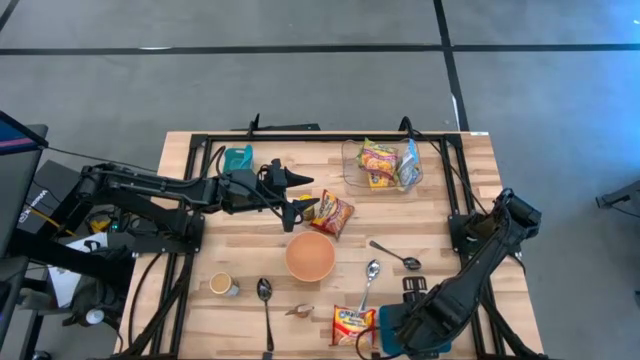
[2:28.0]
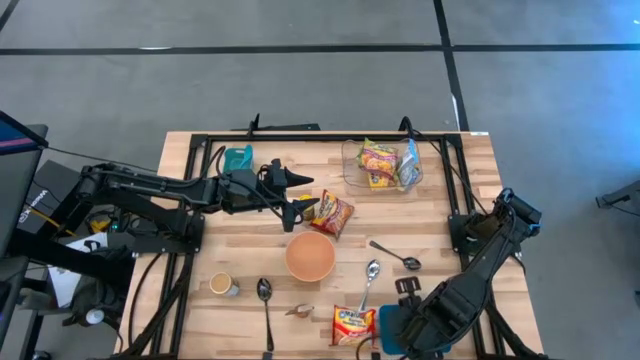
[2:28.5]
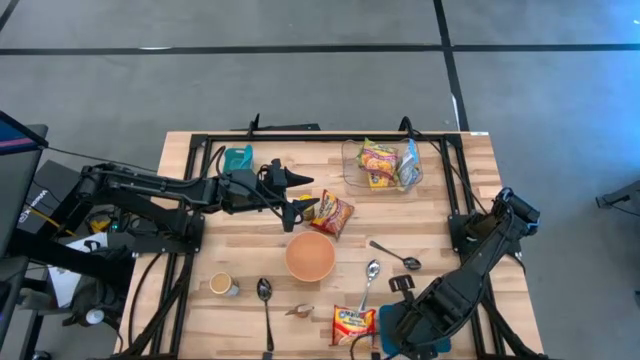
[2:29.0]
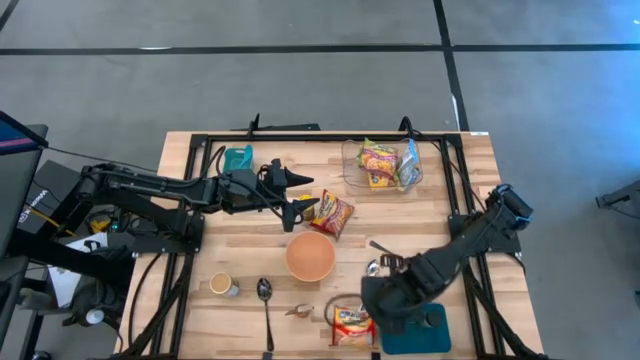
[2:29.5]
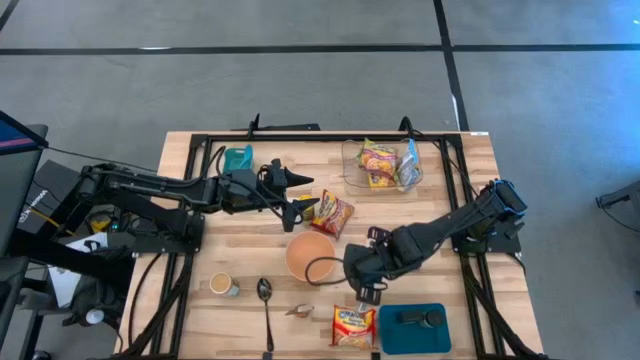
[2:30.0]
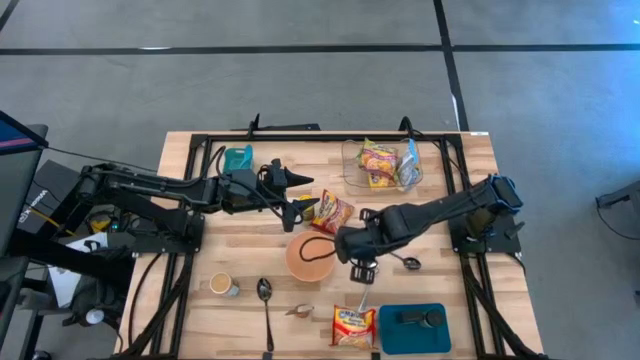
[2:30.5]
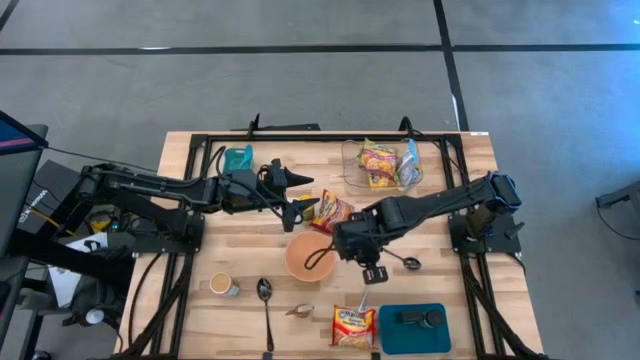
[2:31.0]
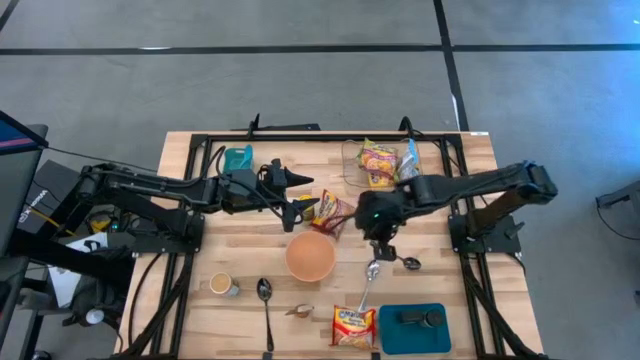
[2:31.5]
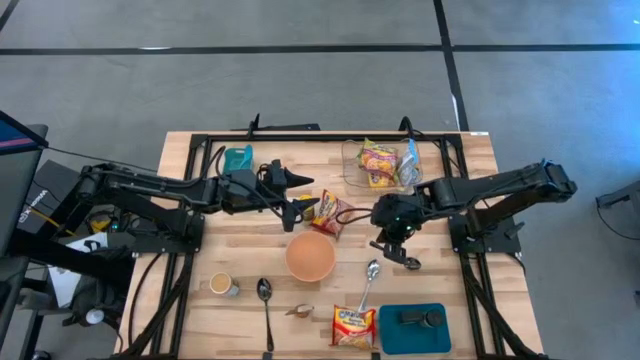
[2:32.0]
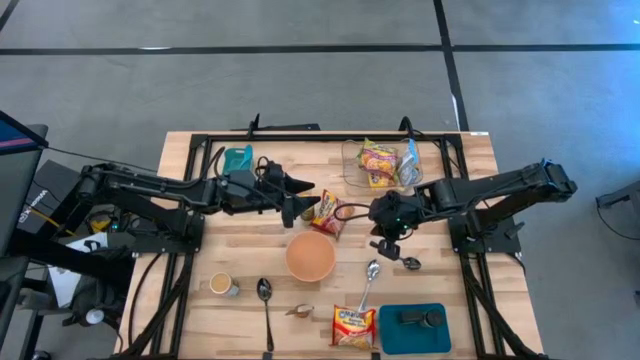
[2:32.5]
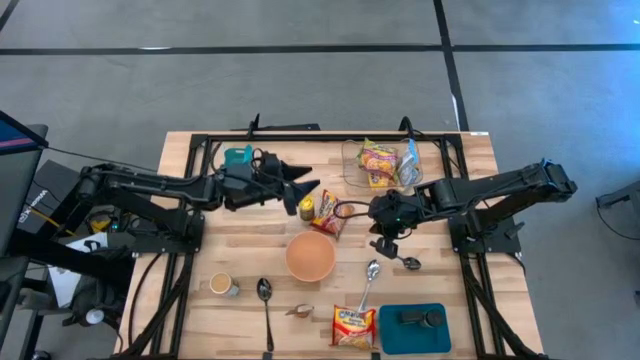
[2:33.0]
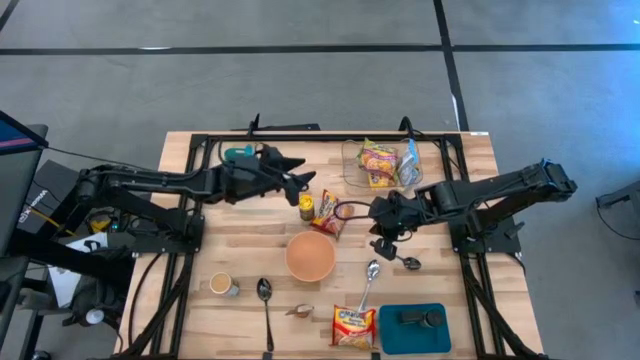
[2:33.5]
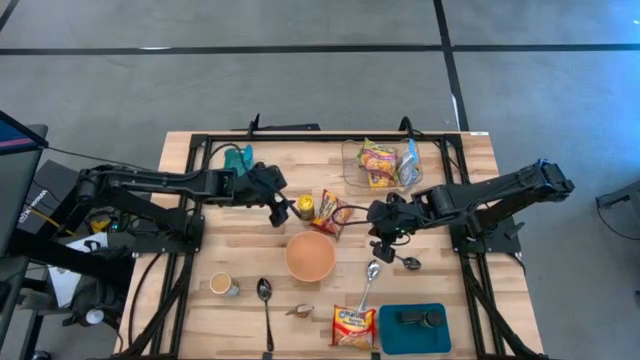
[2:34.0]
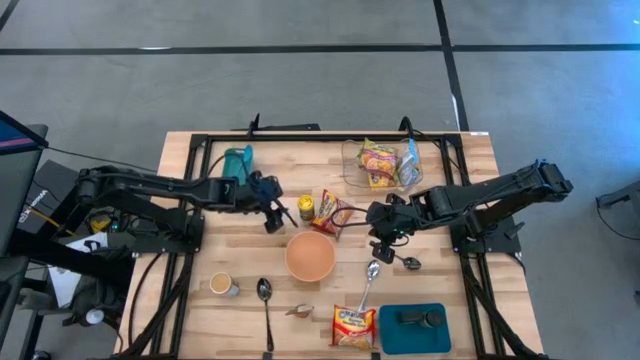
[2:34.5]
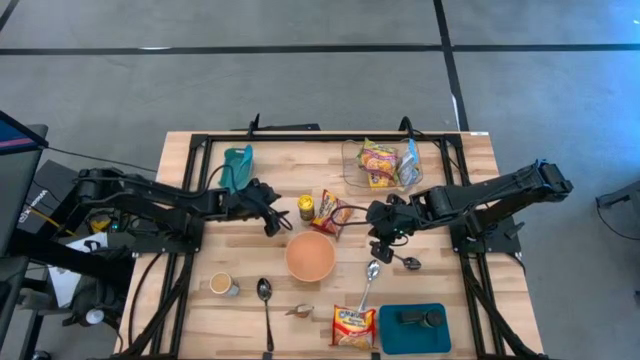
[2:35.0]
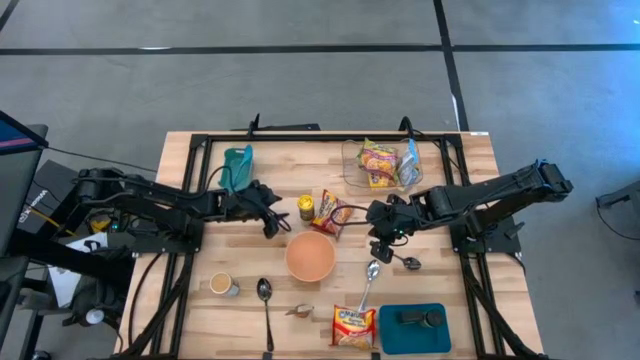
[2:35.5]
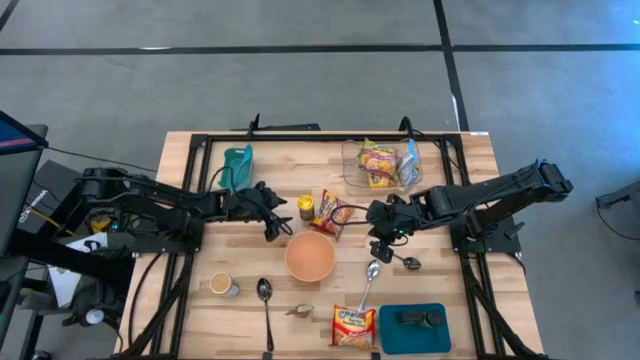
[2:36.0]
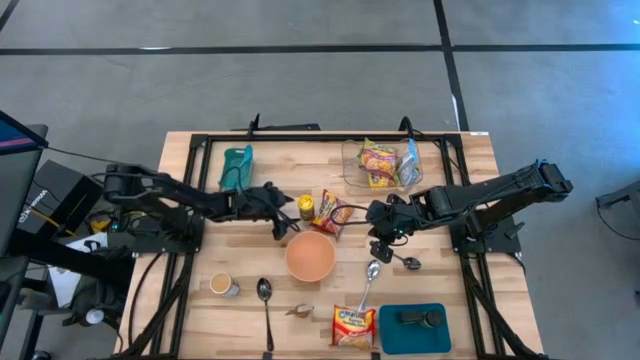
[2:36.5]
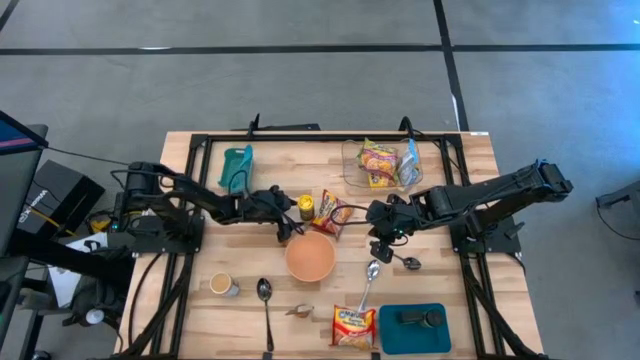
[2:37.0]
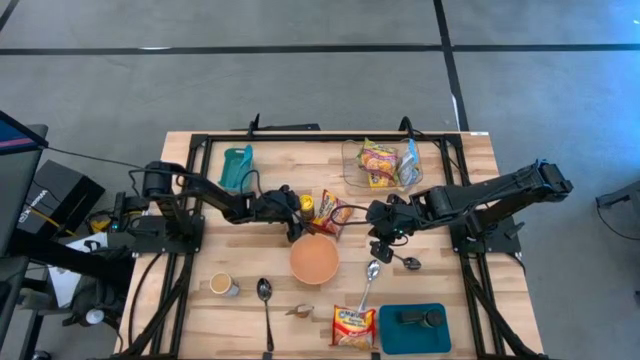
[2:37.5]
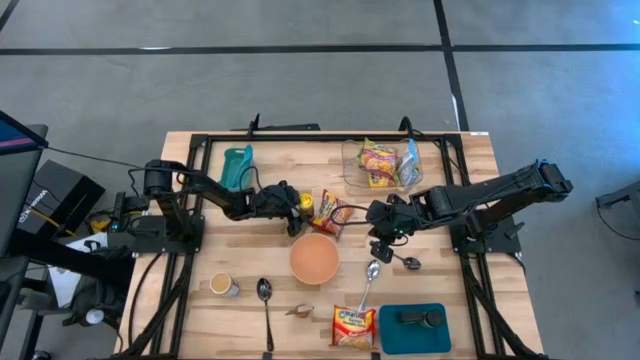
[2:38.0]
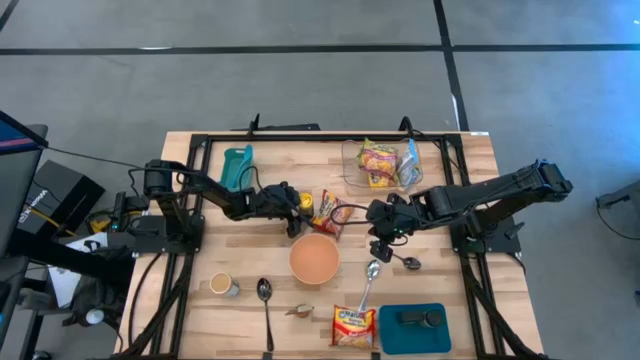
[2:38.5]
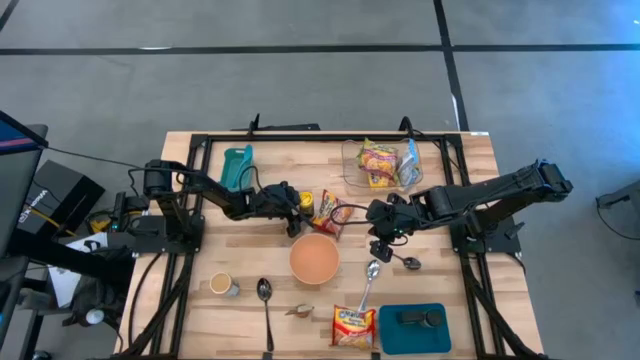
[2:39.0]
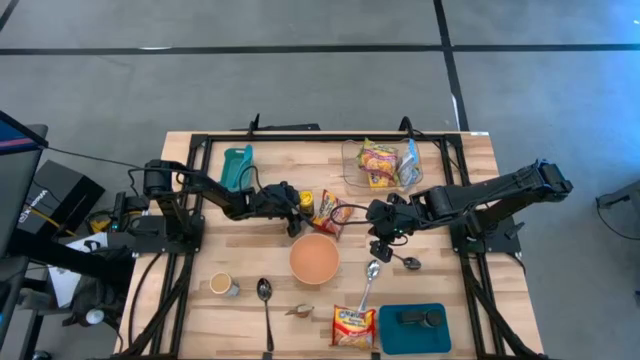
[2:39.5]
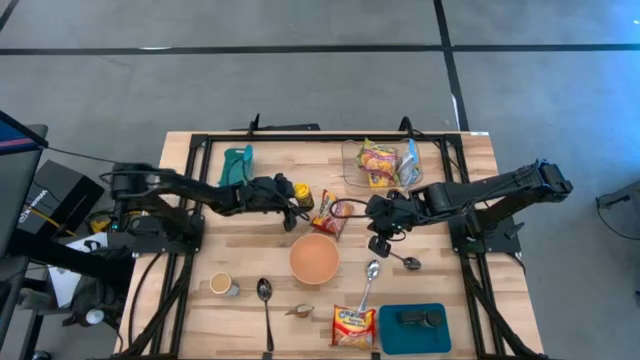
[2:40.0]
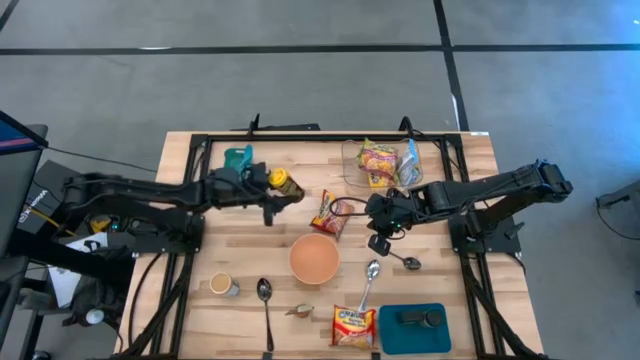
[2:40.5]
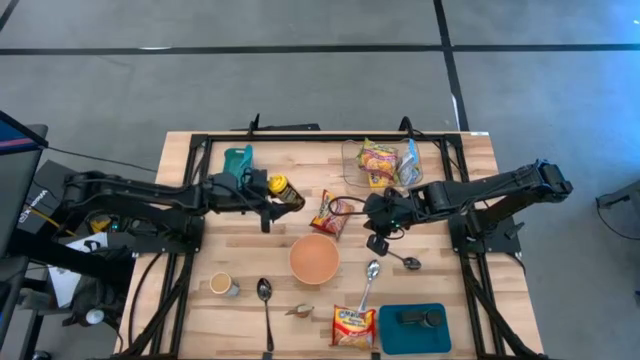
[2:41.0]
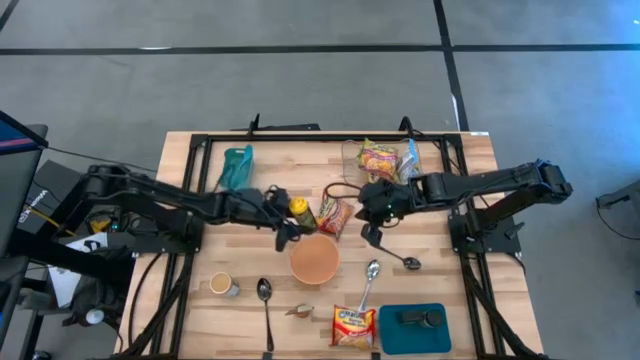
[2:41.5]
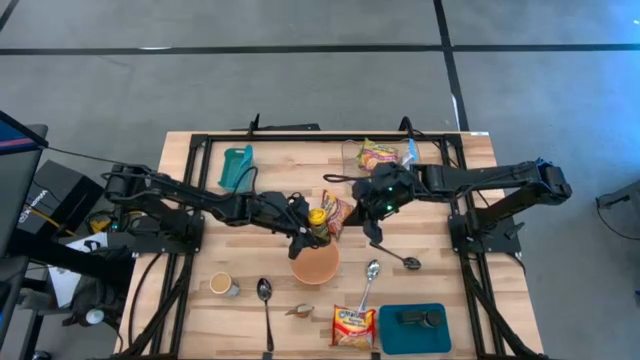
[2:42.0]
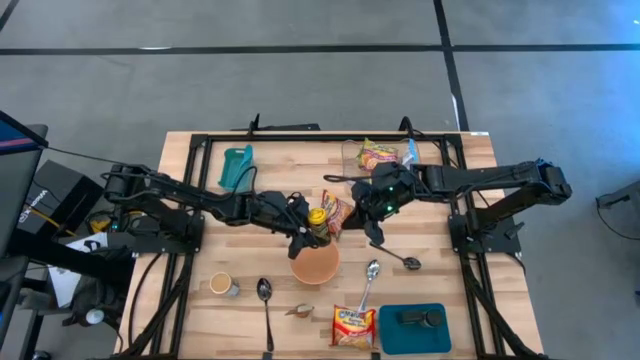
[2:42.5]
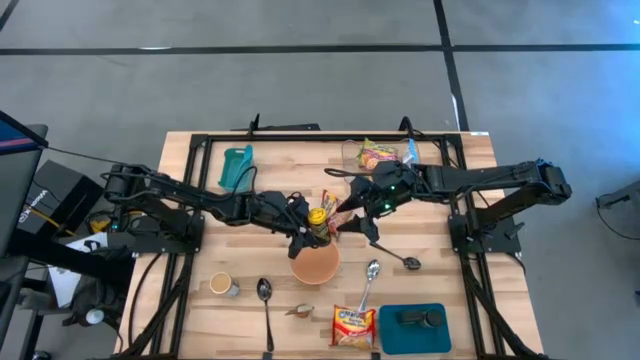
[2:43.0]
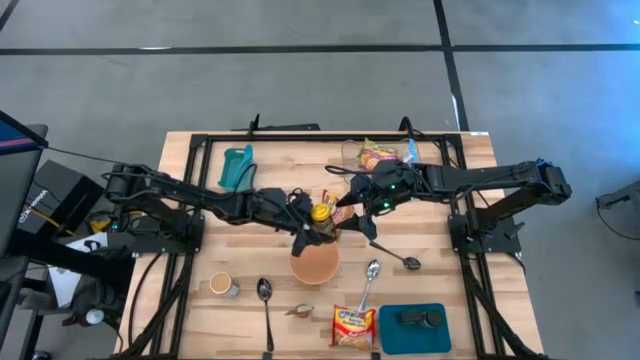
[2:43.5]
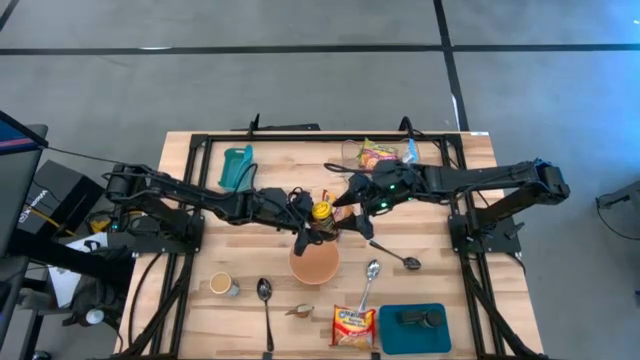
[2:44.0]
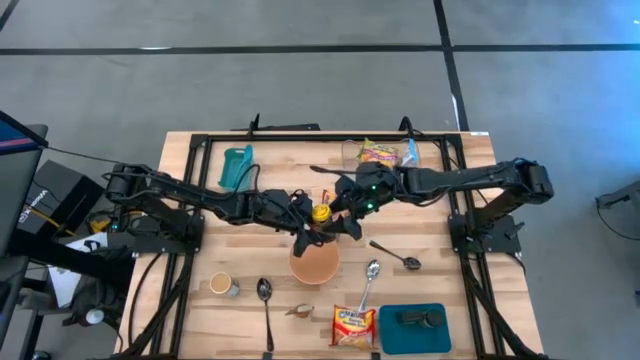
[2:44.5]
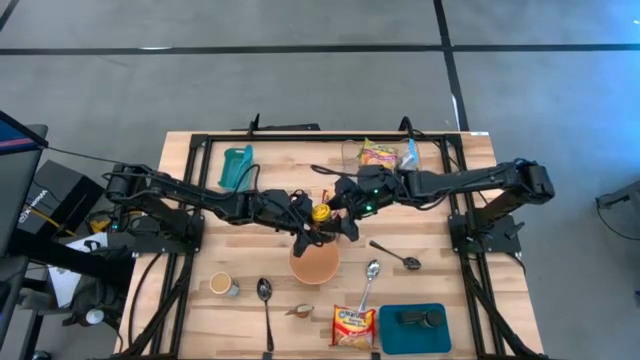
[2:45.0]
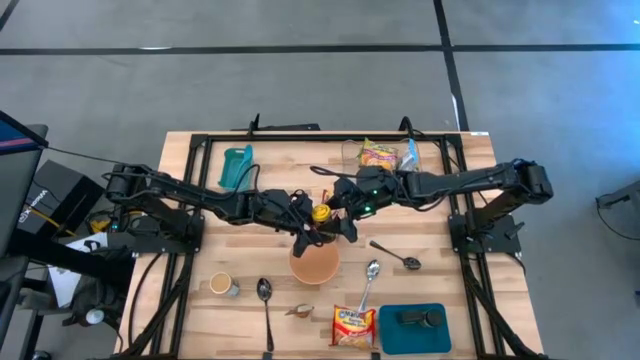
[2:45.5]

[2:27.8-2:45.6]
Task: Pick & Place Food Item
Put the yellow seasoning can into the dark blue bin

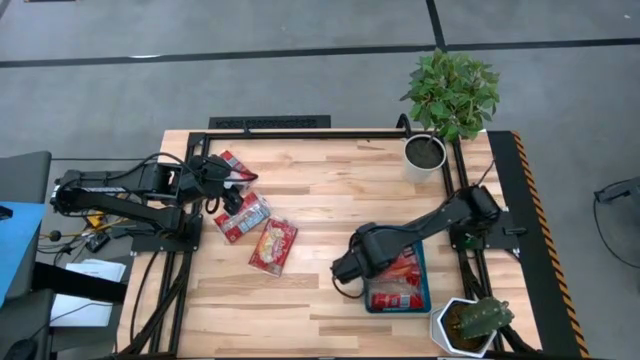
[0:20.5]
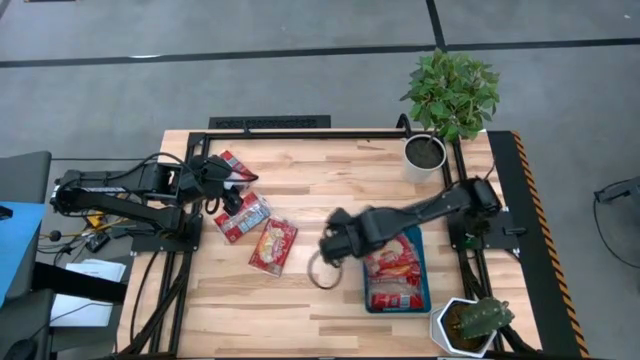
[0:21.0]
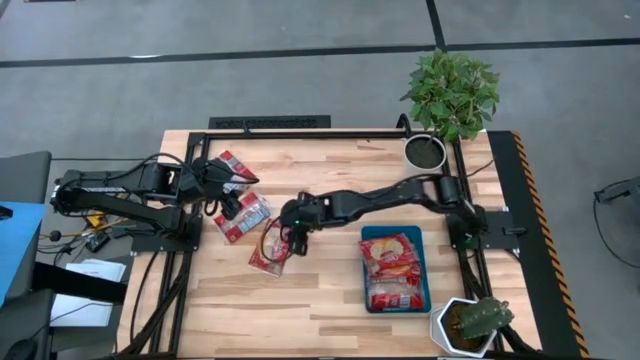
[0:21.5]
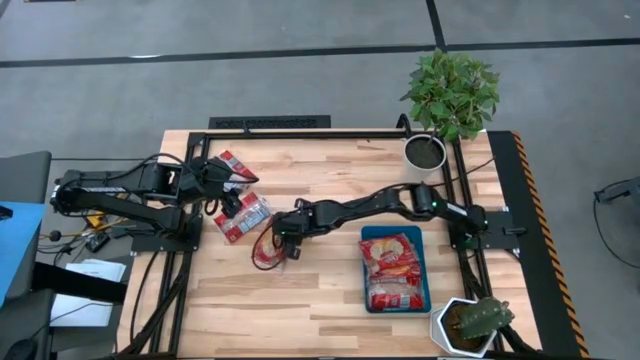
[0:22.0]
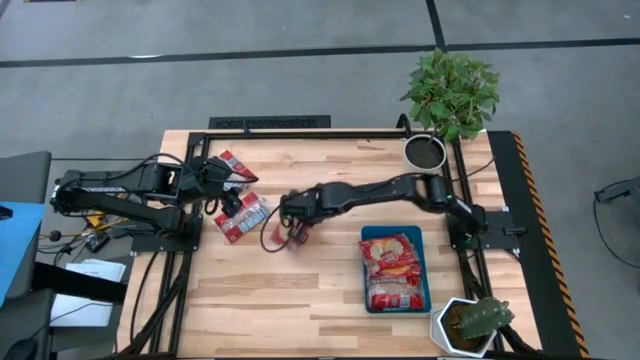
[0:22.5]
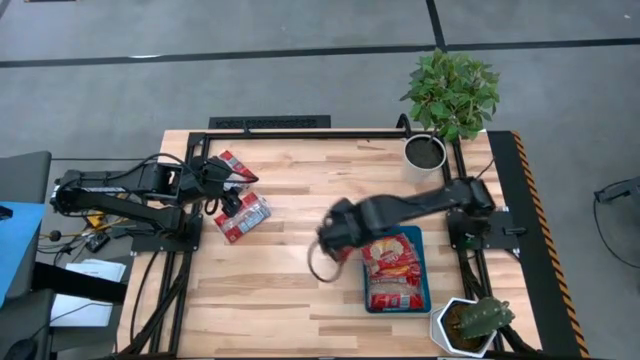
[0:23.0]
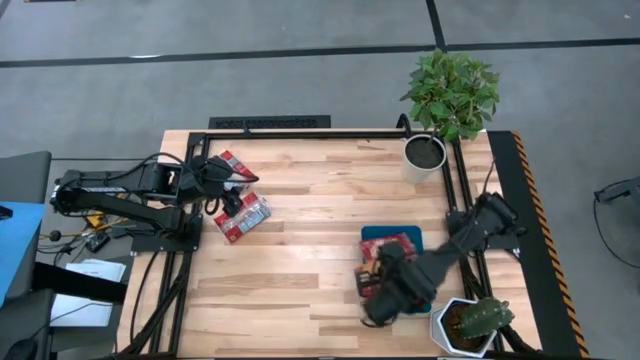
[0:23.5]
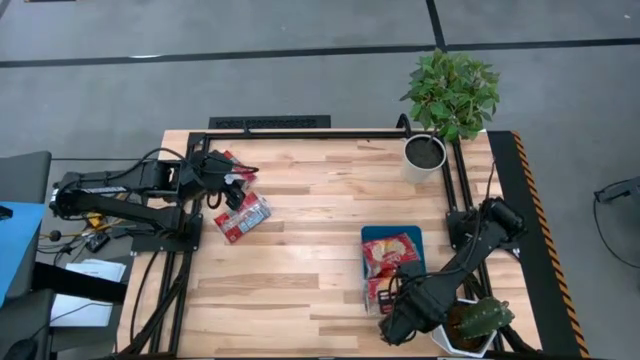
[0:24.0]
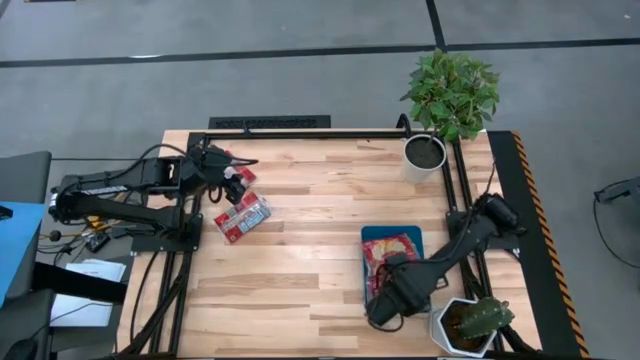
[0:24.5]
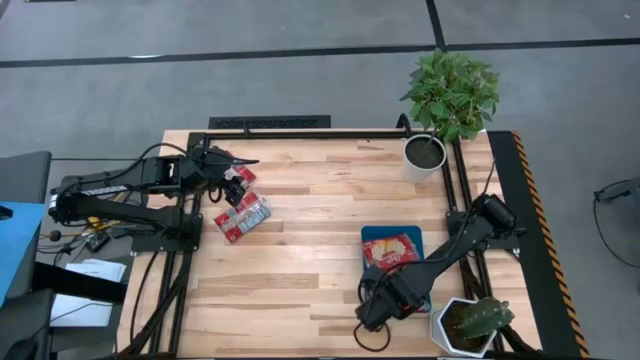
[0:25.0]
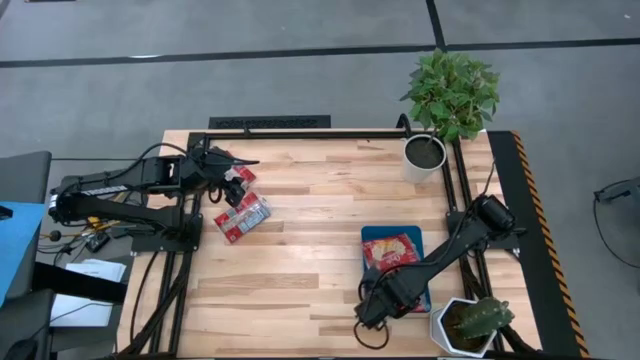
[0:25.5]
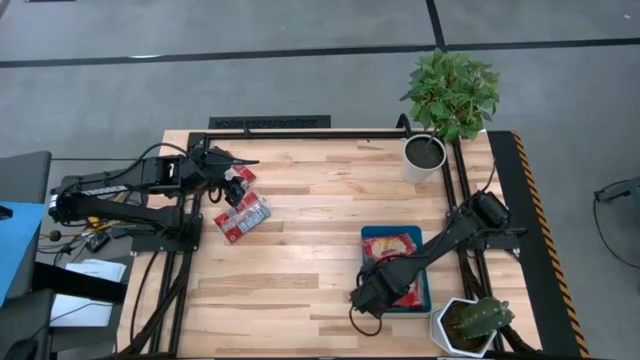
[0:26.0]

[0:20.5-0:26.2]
Task: Sort popcorn bags into baskets
Put the bottom red popcorn bag into the blue bin
